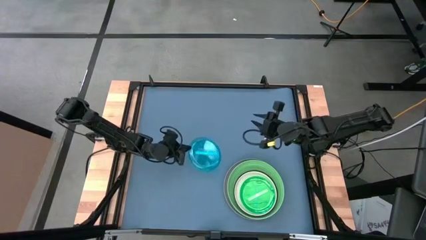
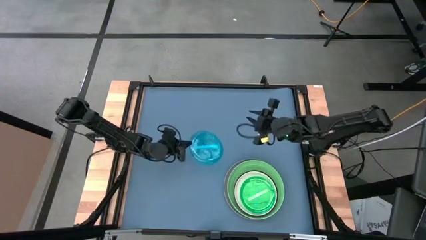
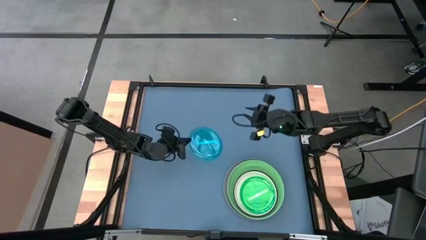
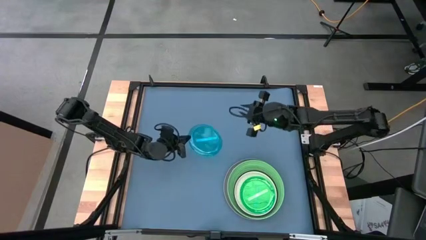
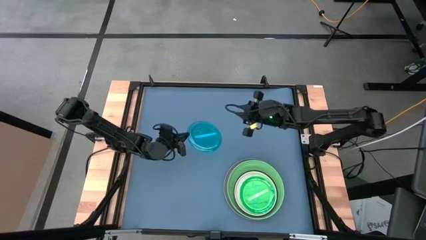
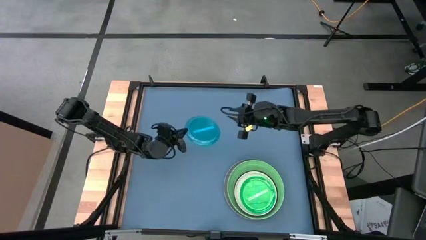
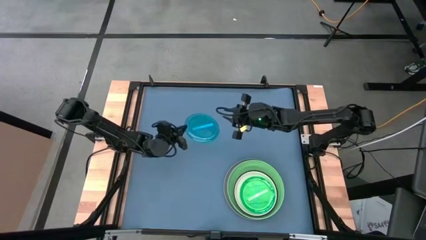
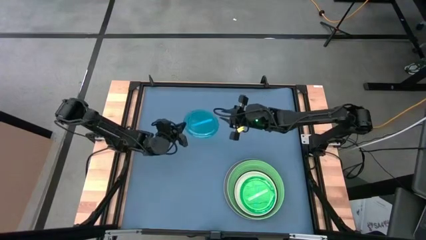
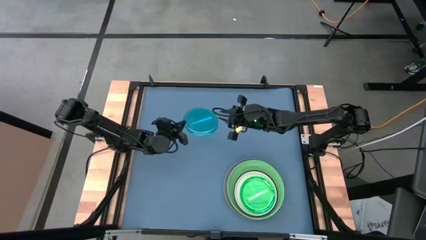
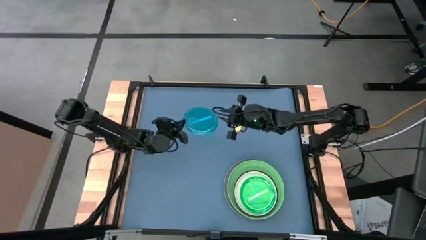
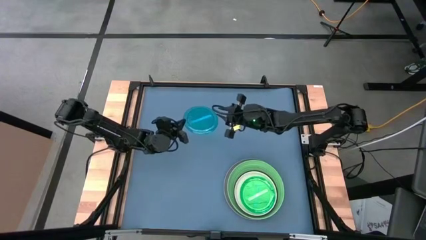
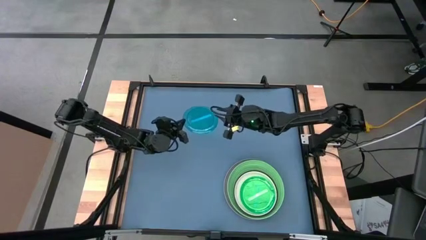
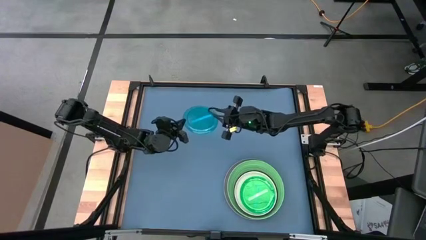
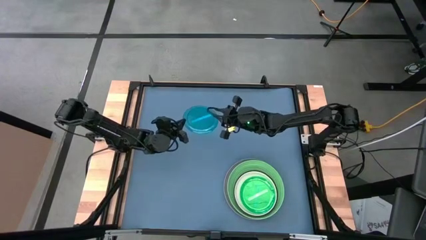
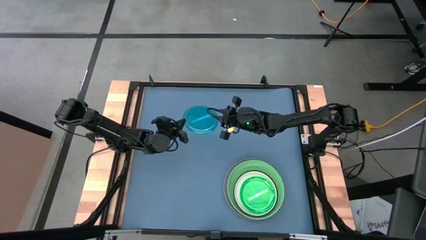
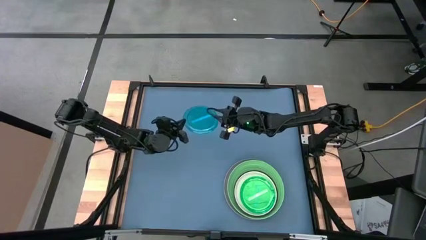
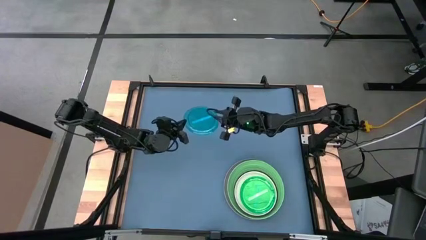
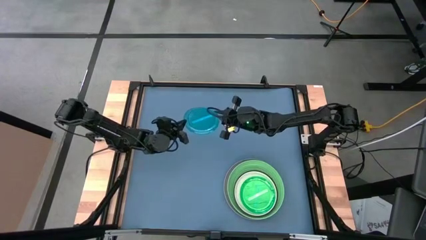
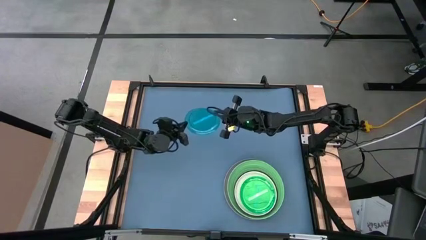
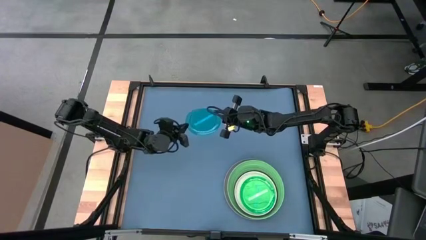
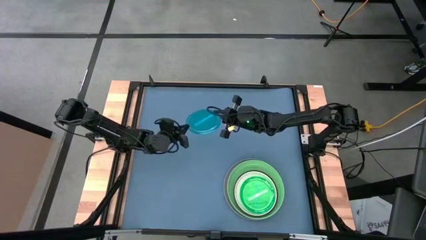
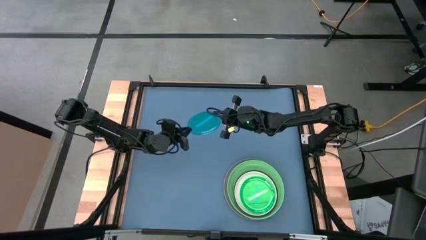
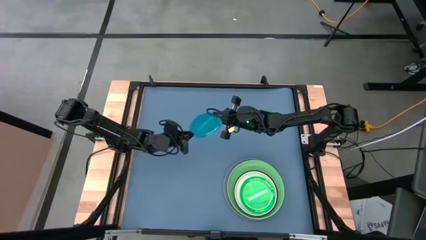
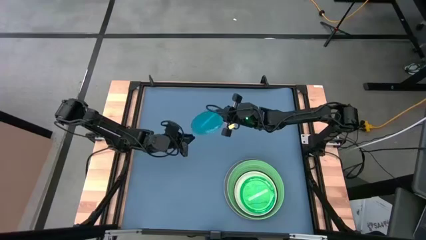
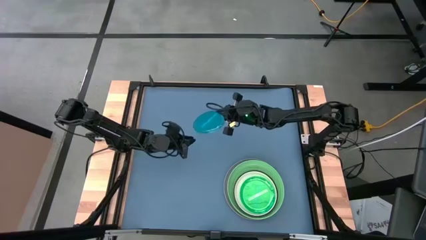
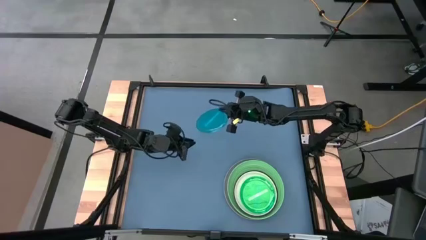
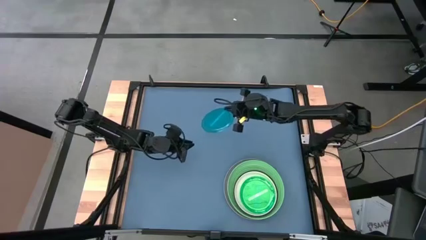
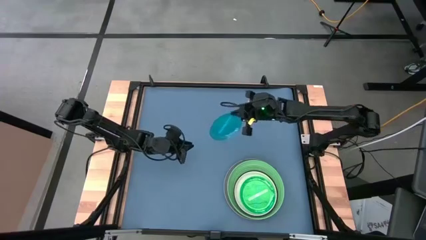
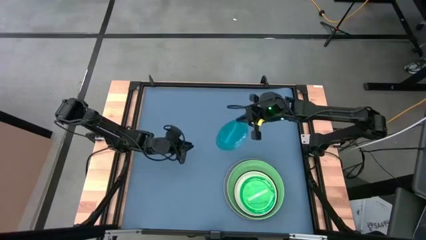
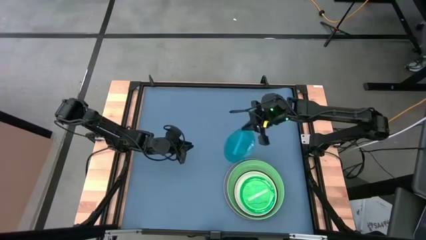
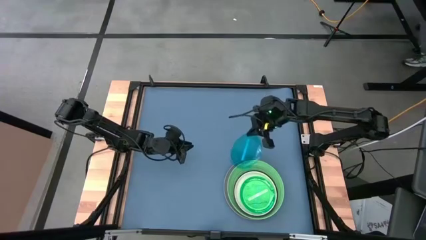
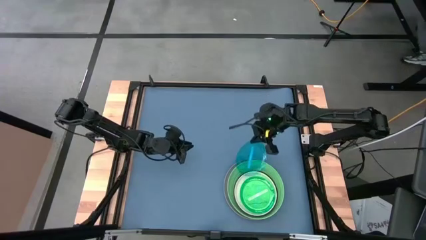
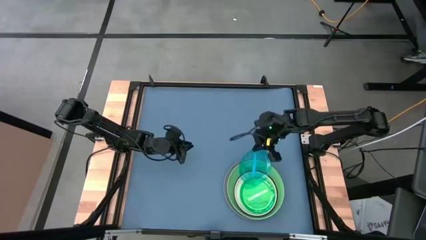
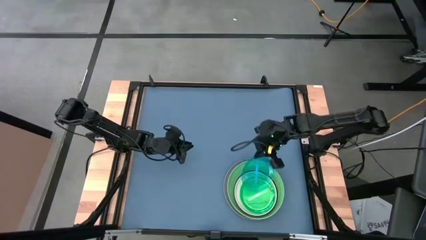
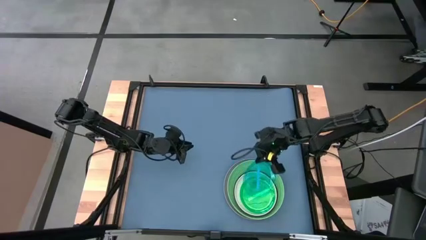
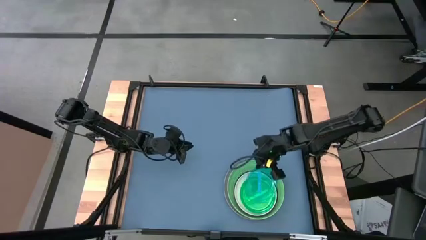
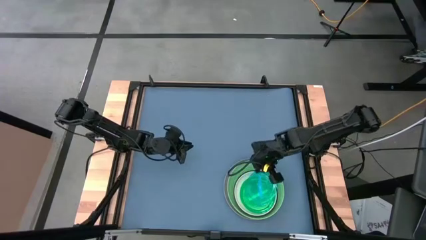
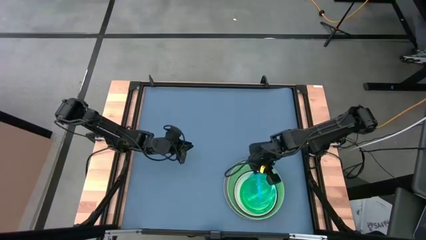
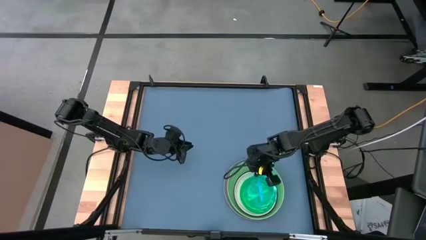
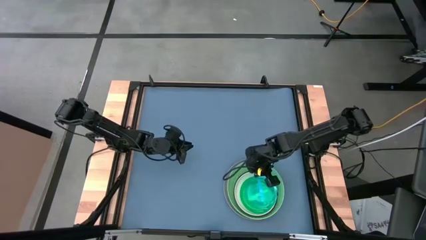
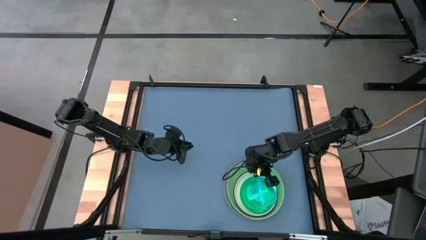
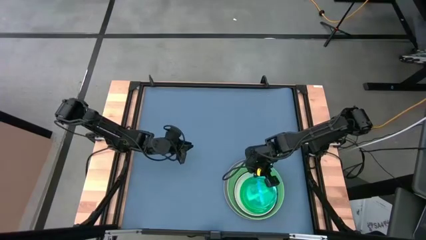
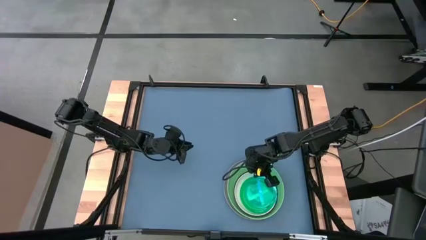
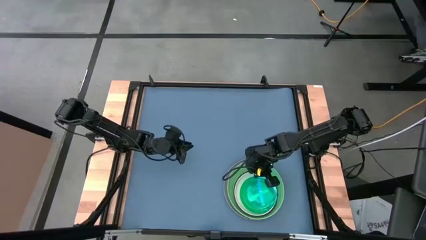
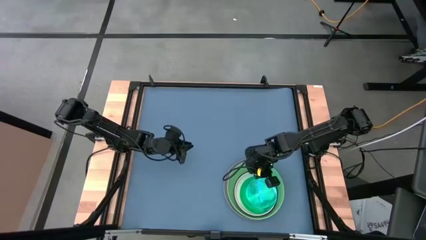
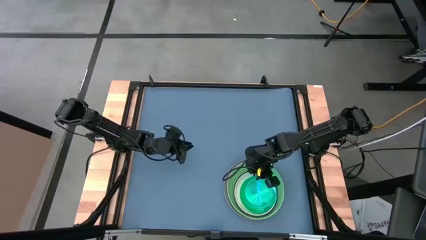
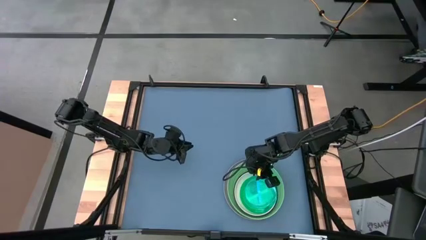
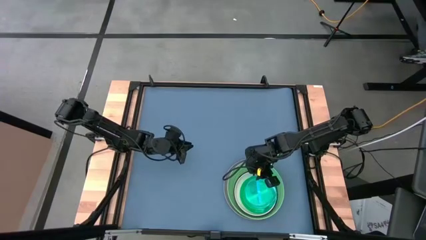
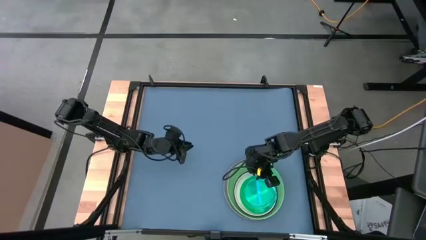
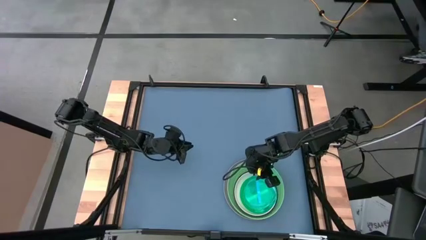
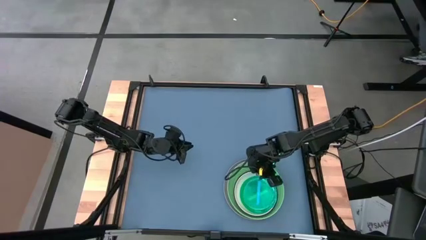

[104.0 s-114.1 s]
Task: Stack plastic plates
Stack the blue plate on top of the small green plate

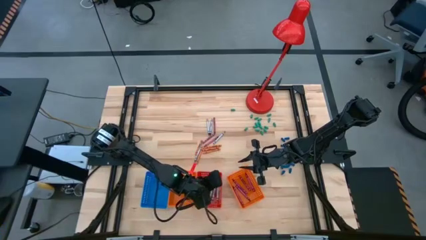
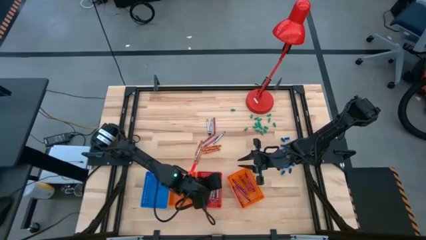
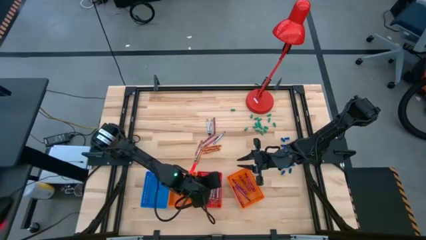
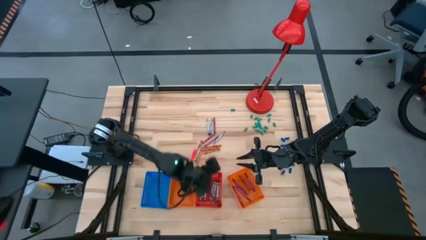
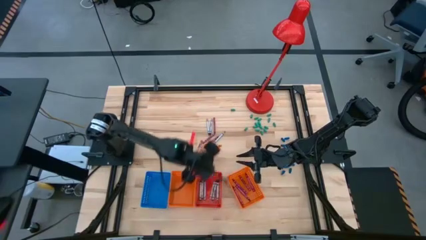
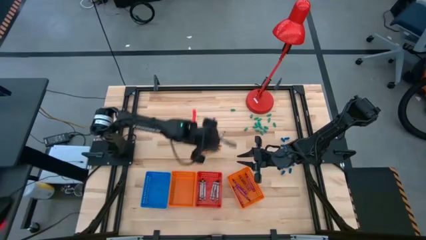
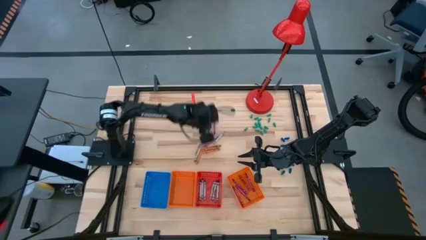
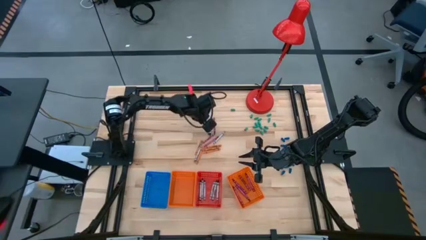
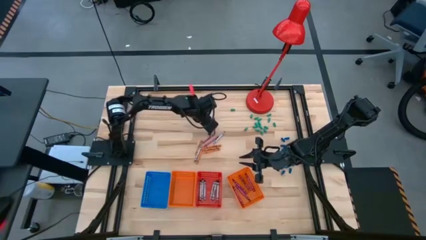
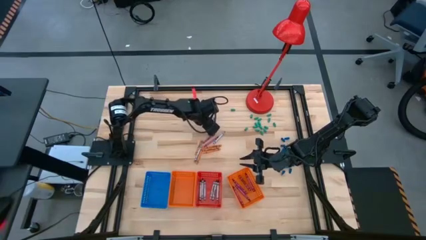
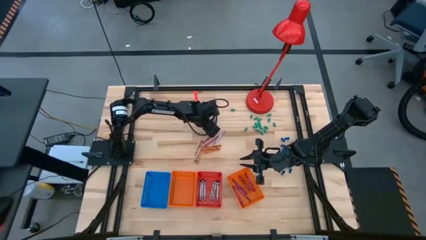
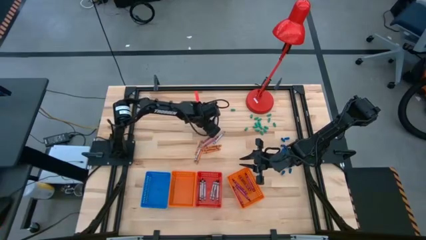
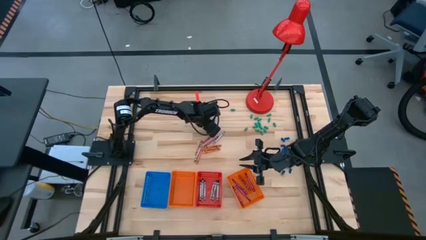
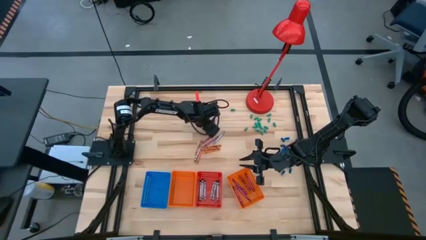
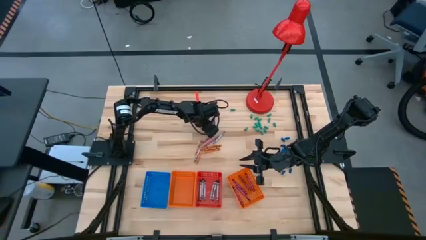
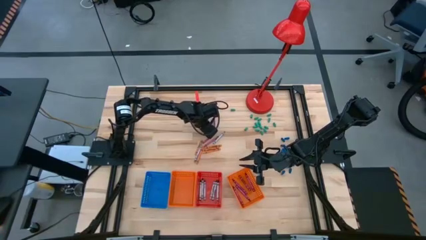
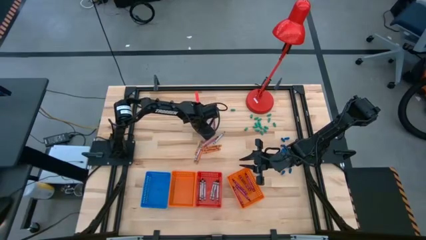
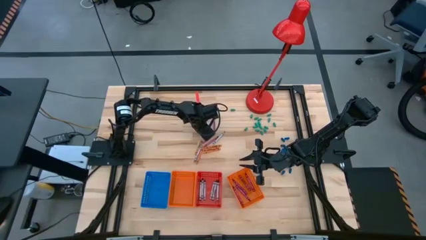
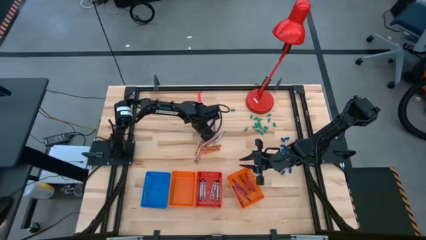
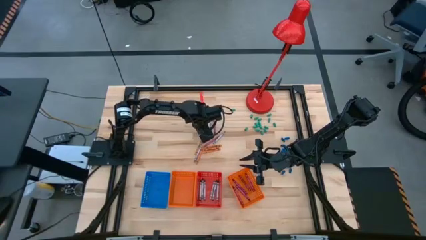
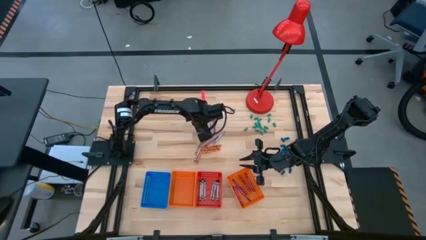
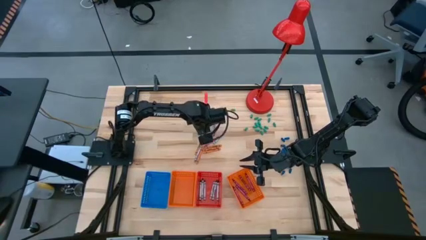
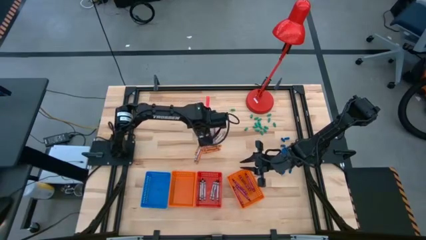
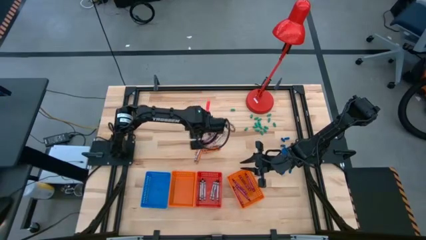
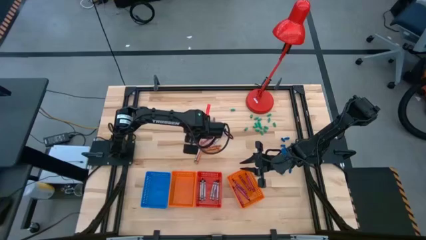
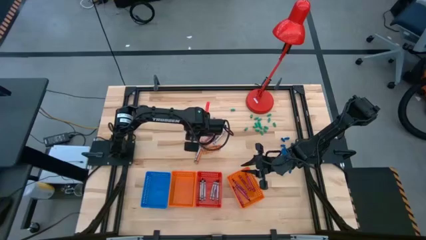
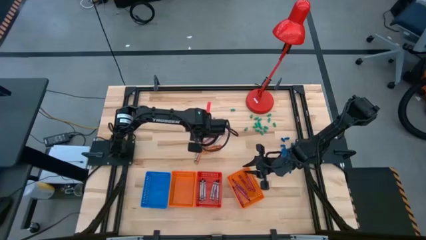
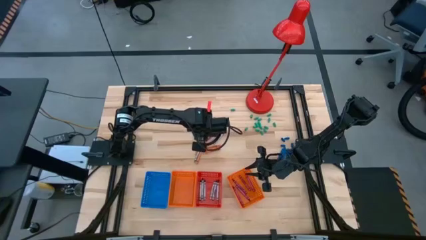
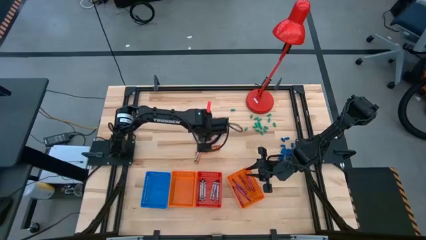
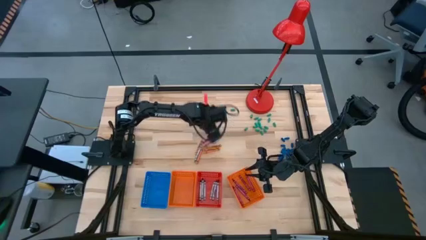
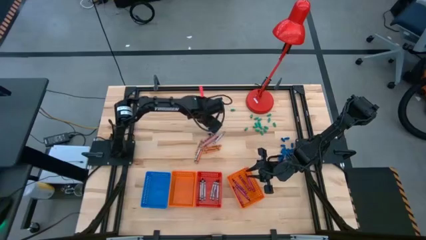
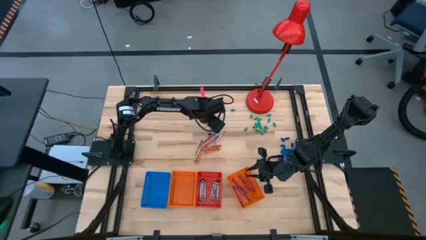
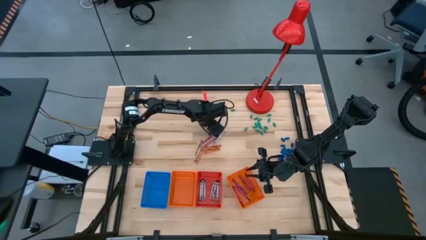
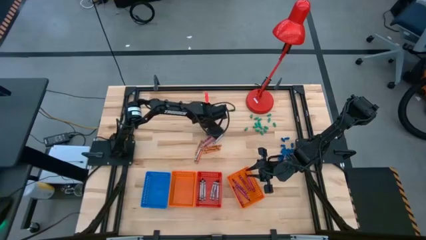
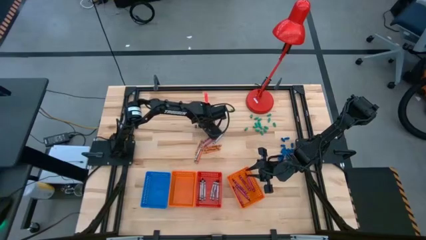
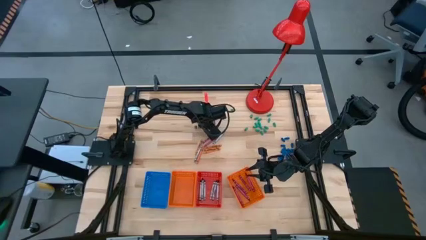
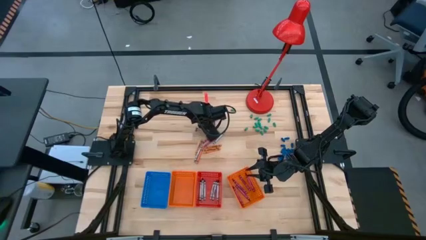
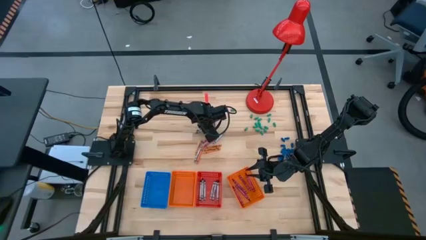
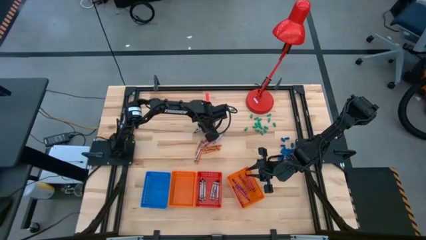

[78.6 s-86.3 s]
Task: Sort crayons
Put the black crayon into the red bin
